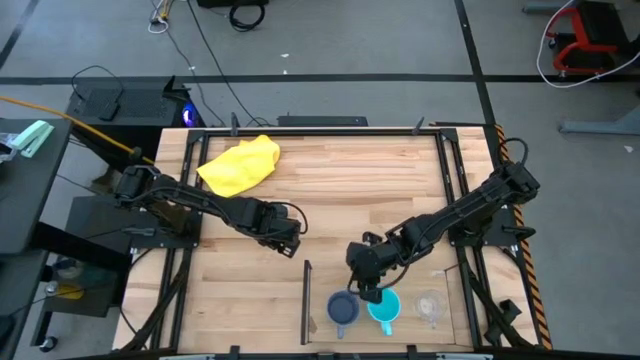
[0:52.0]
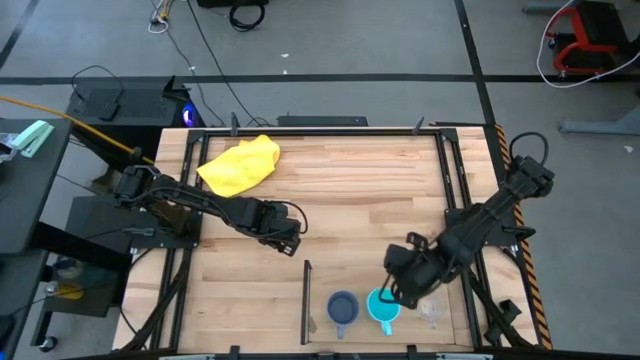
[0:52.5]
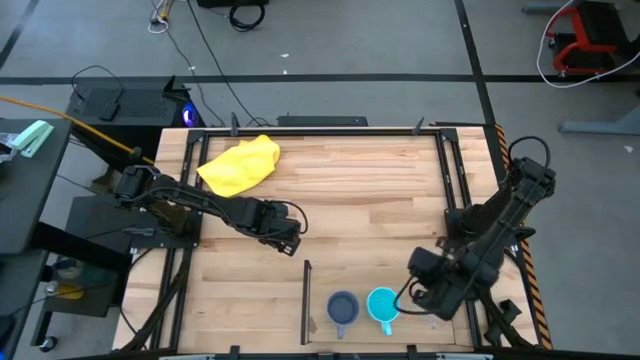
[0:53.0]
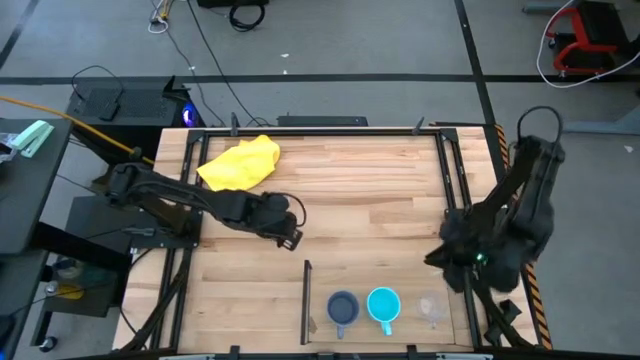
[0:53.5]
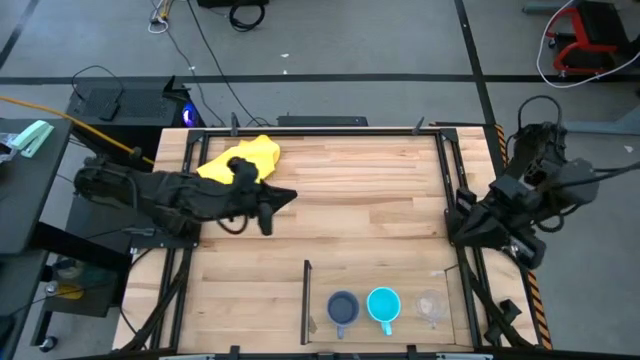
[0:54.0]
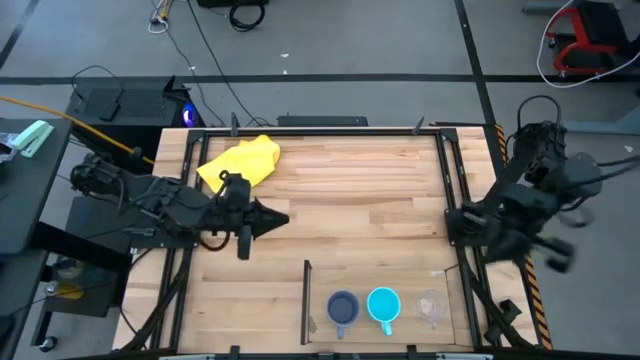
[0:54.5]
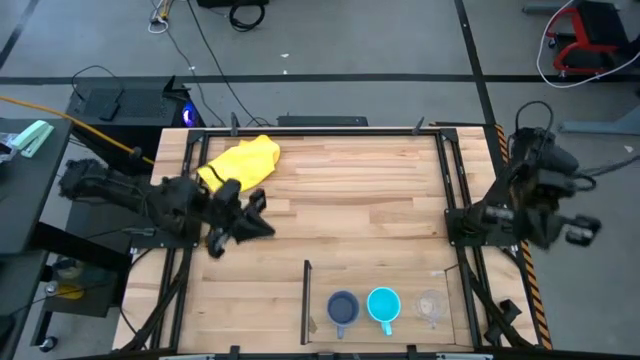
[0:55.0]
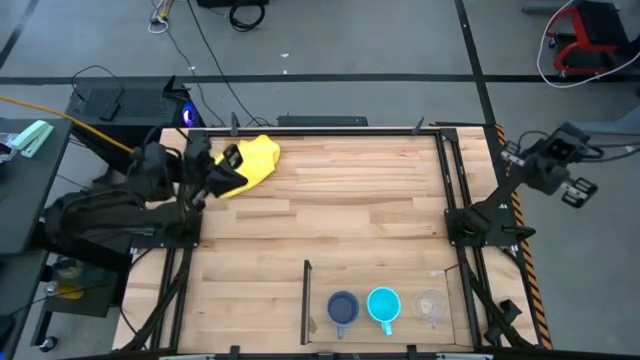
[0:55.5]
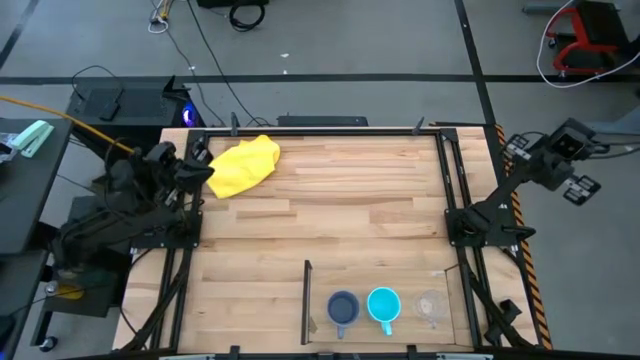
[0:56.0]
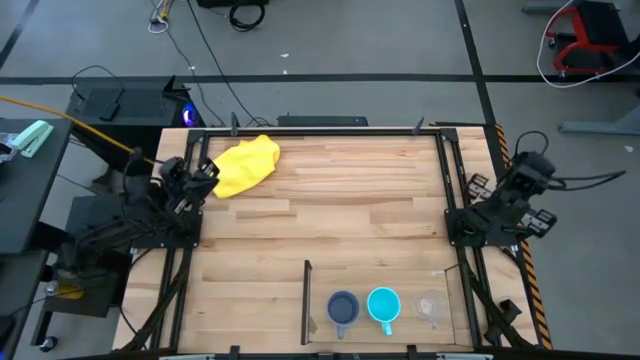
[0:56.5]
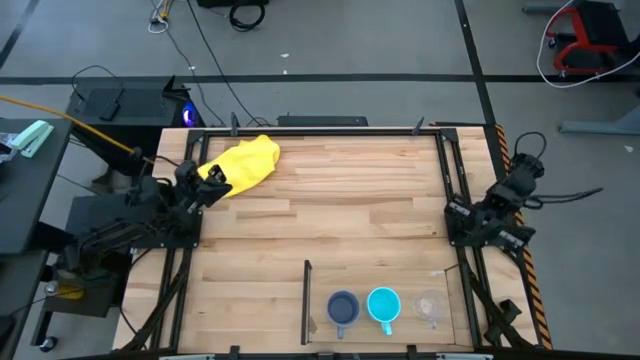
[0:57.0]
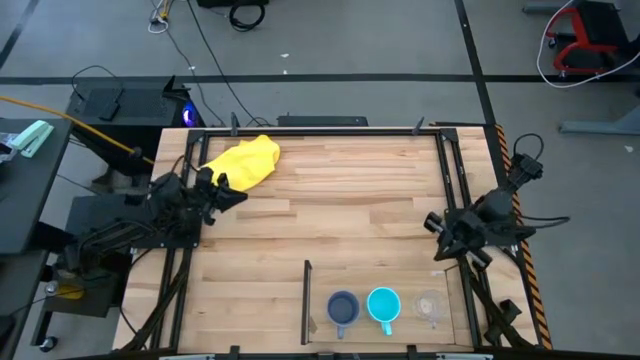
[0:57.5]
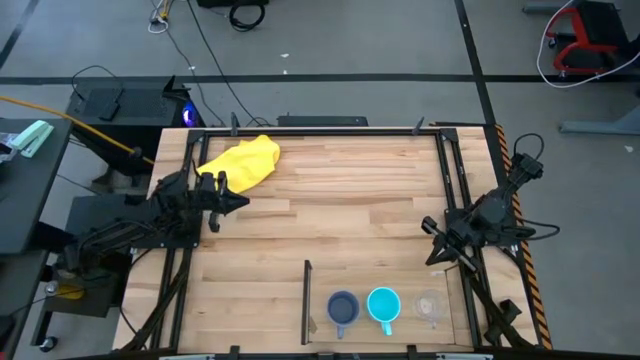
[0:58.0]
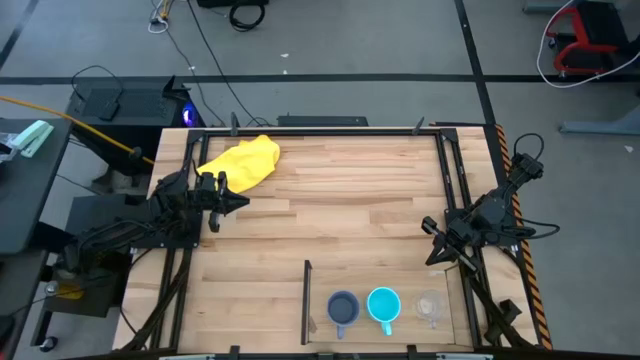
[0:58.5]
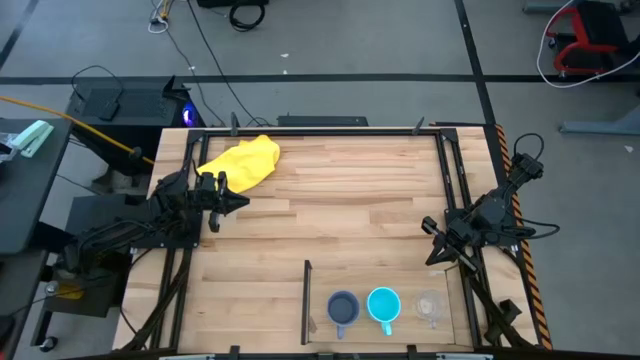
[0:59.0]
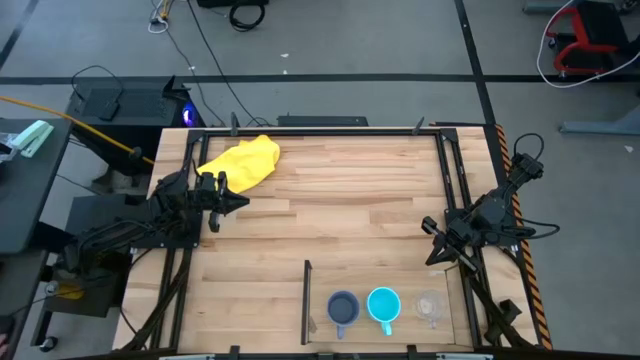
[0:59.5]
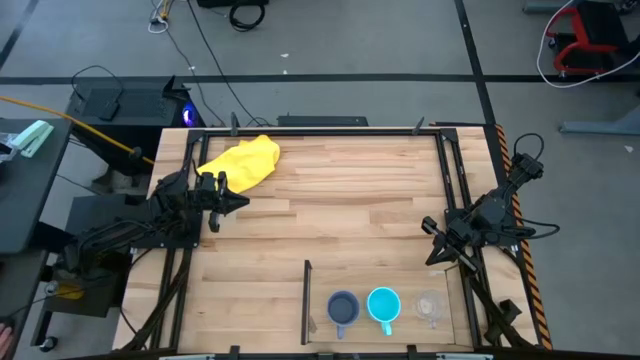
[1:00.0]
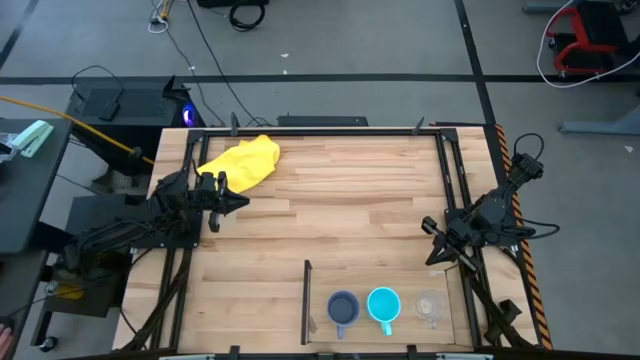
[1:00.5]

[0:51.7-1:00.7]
Task: Stack small to large cups/mugs on shelf
Return to Home Position

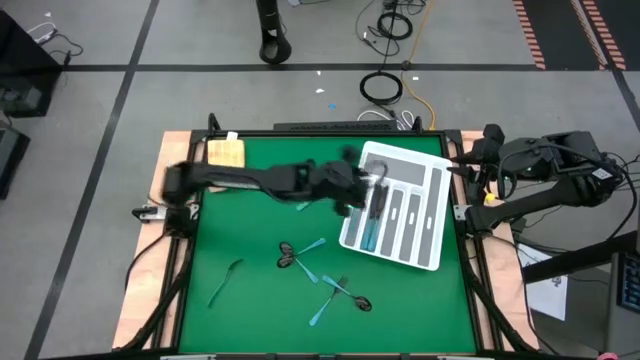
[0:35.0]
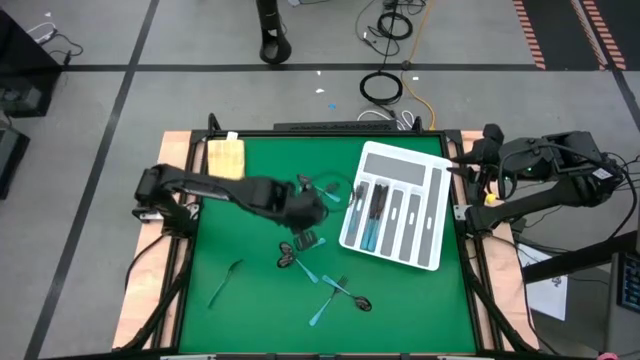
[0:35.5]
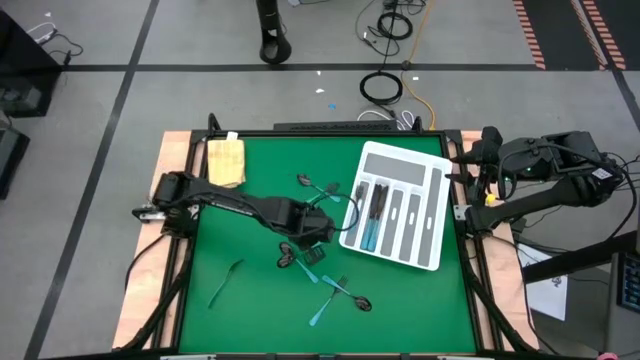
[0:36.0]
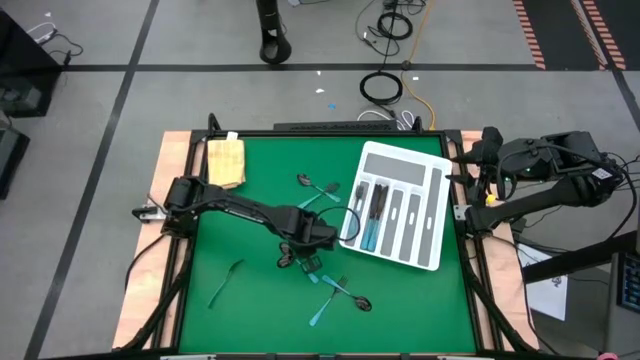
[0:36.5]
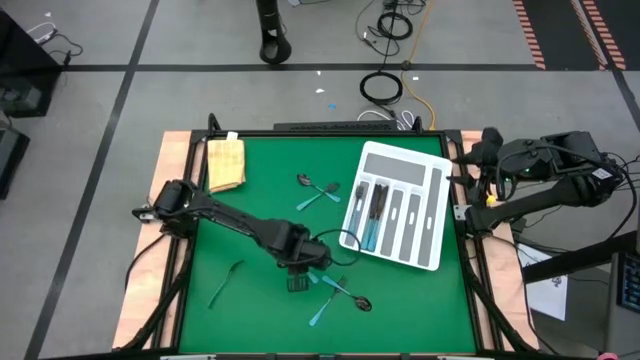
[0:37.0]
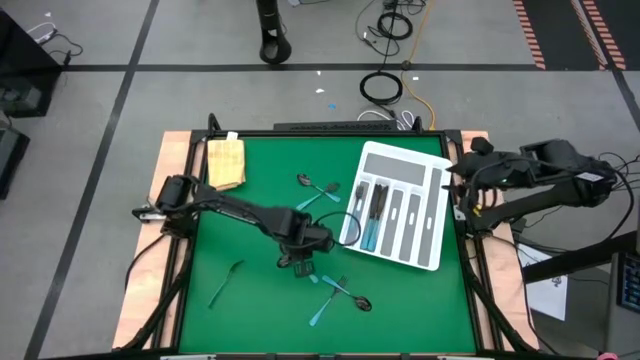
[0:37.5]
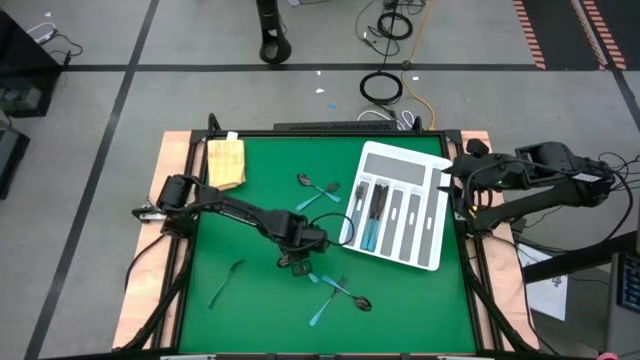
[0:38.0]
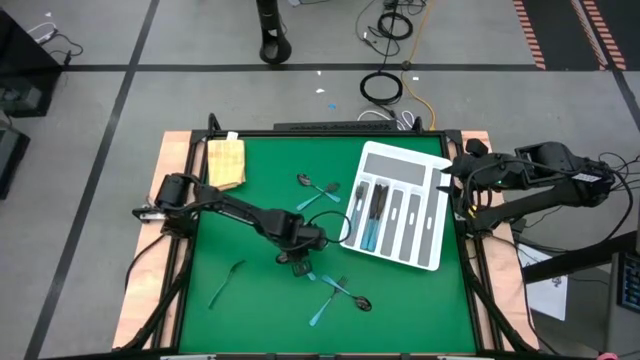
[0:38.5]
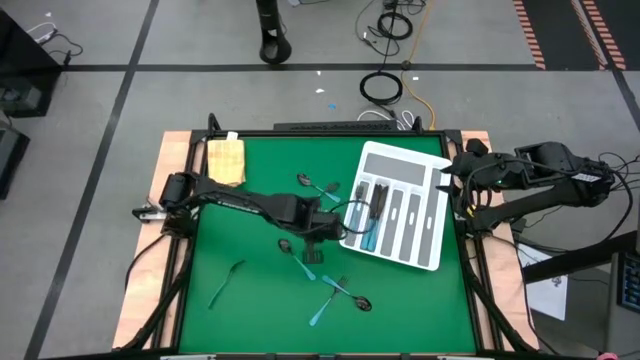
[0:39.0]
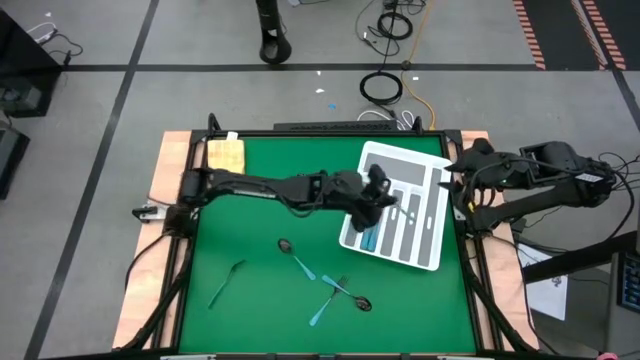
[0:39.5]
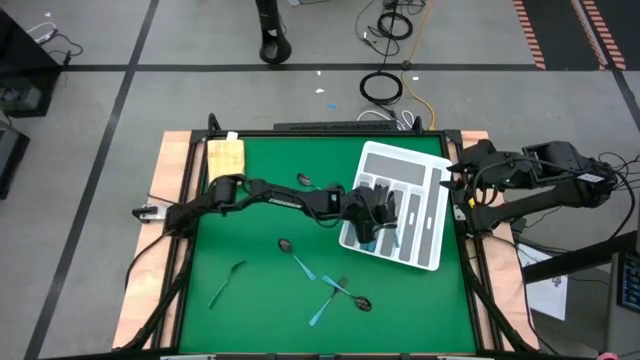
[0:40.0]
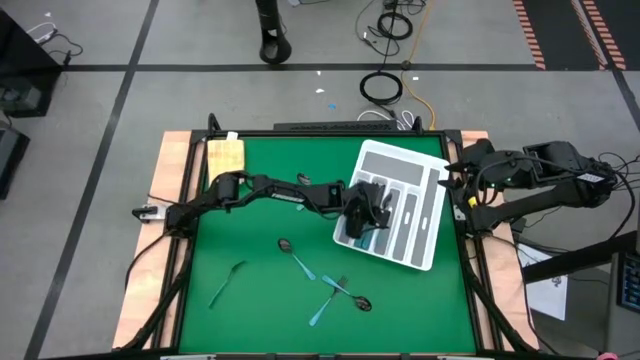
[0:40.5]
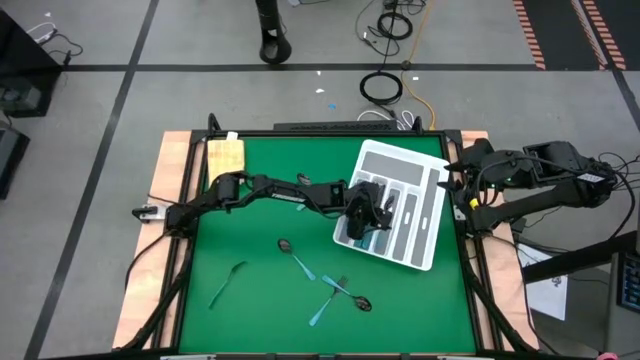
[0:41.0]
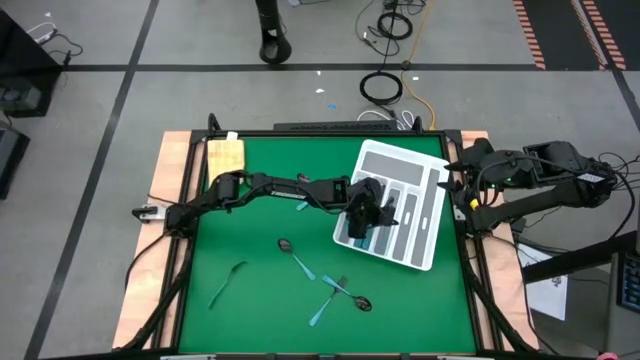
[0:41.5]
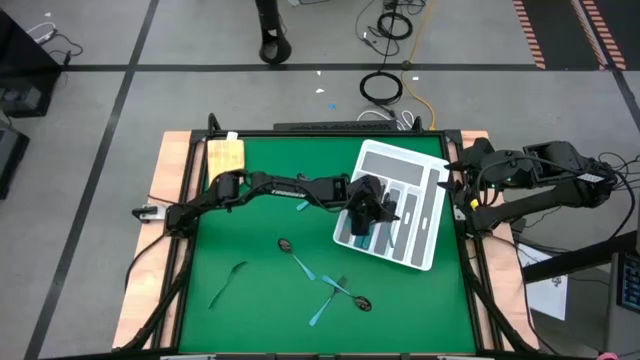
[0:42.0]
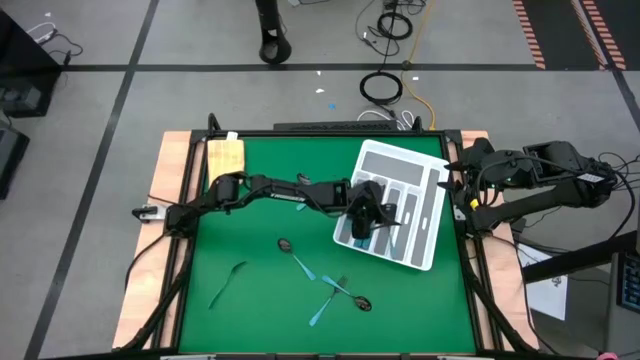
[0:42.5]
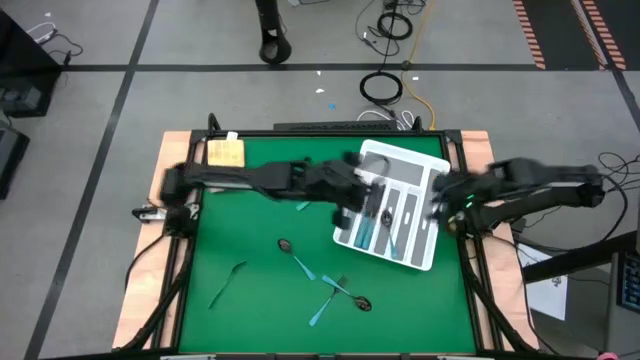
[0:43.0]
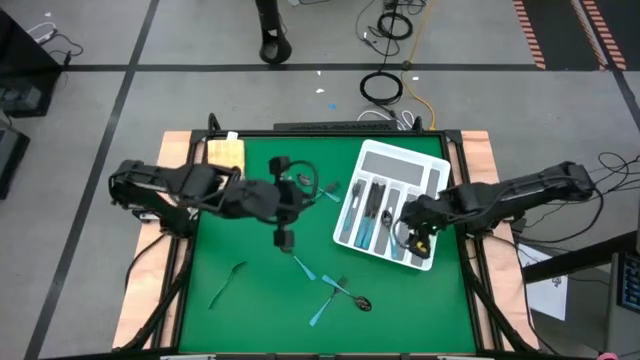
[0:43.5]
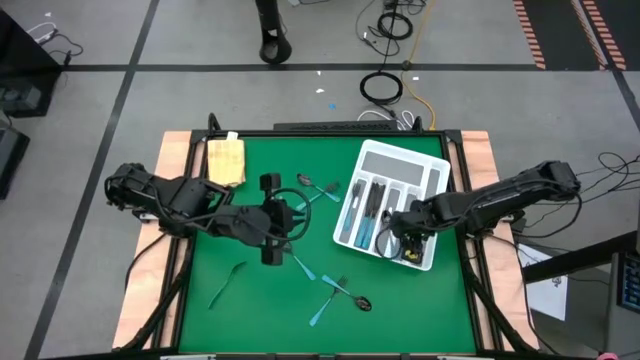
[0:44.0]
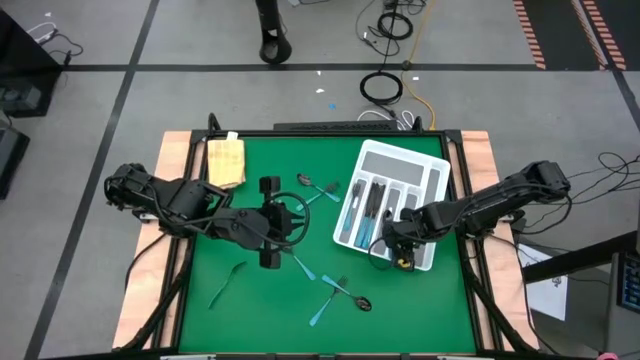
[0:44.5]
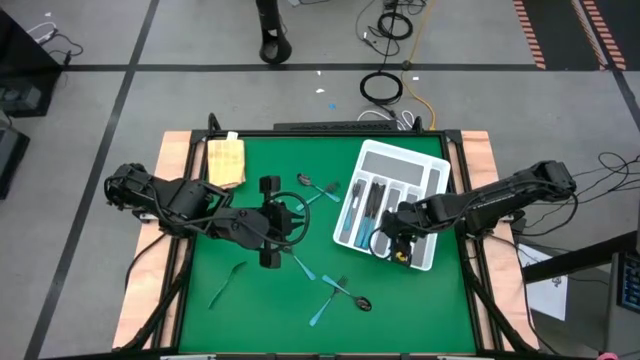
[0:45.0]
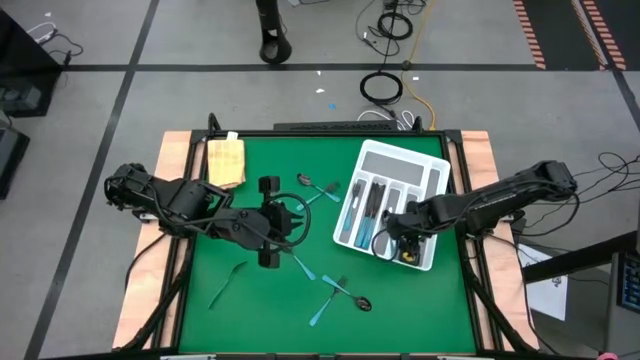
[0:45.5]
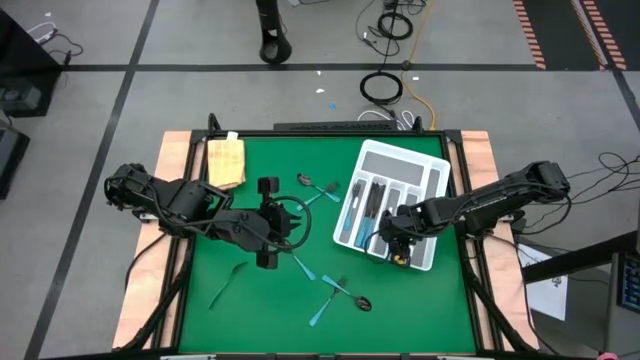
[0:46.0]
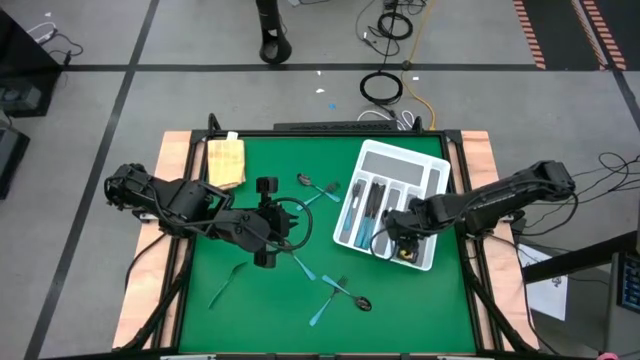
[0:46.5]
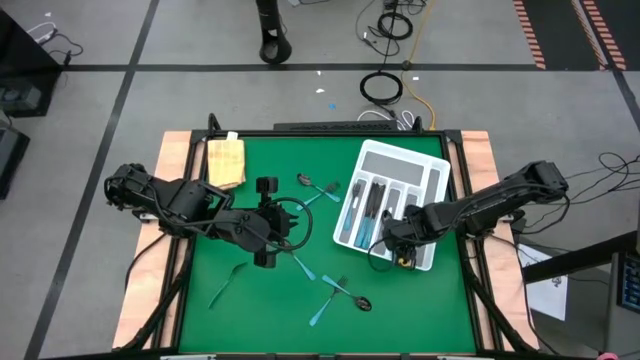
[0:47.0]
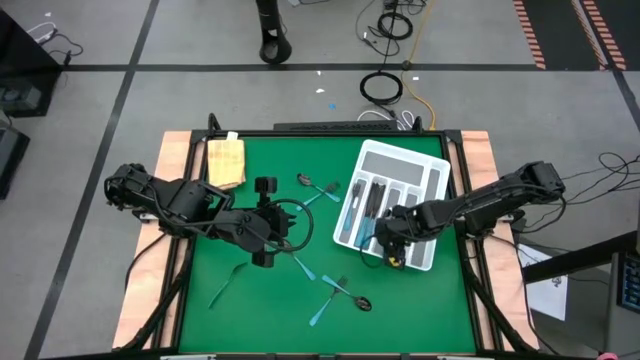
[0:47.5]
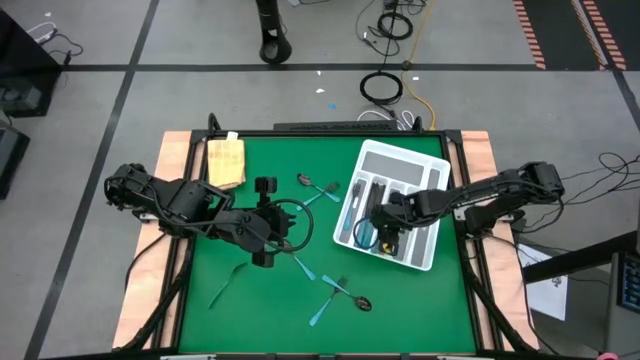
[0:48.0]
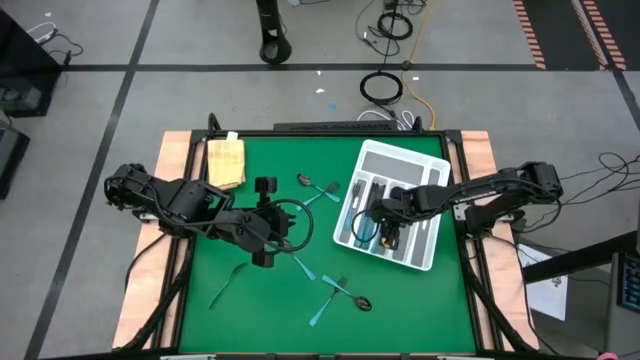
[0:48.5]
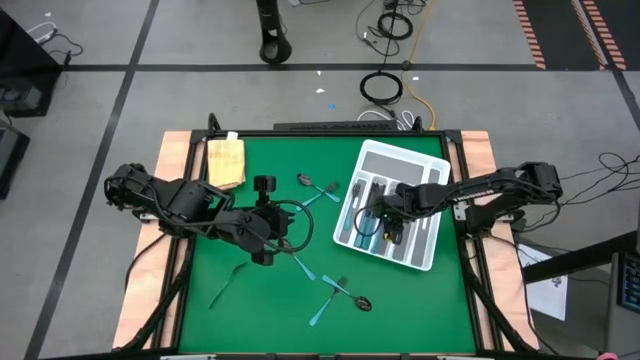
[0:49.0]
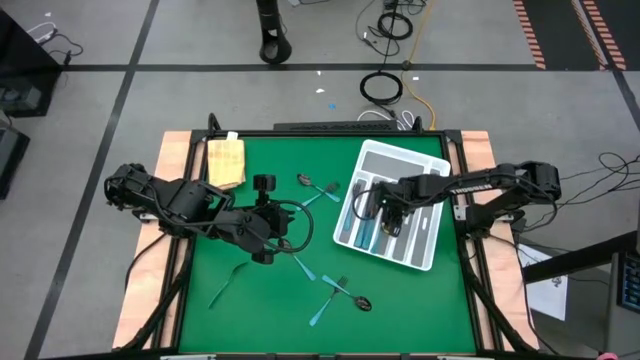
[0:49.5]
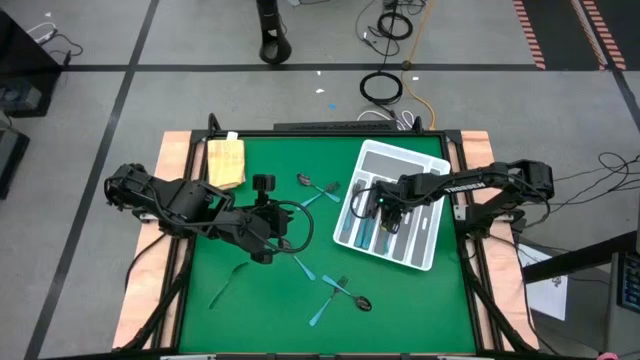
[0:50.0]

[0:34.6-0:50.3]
Task: Sort silverware
Put the blue spoon into the white cutlery tray
